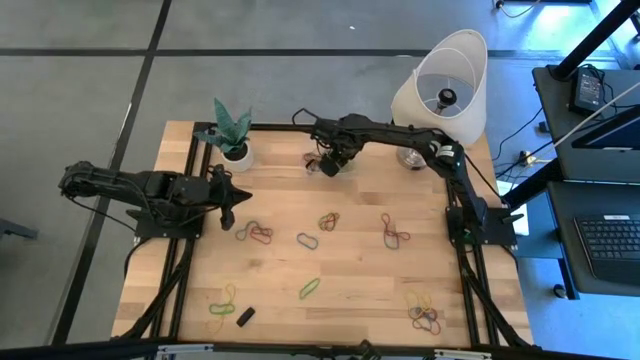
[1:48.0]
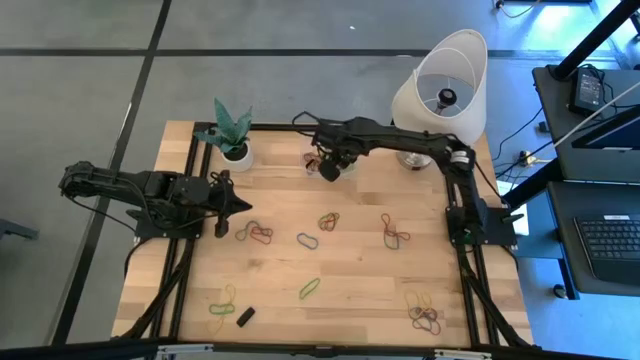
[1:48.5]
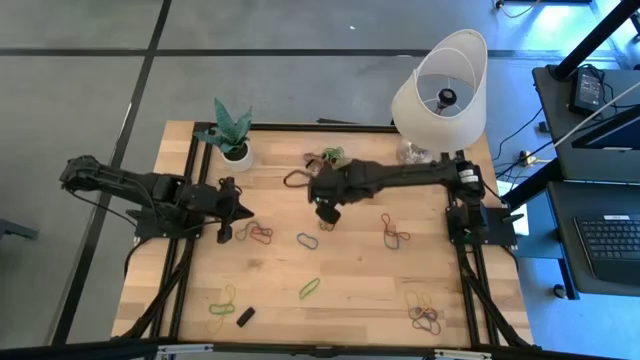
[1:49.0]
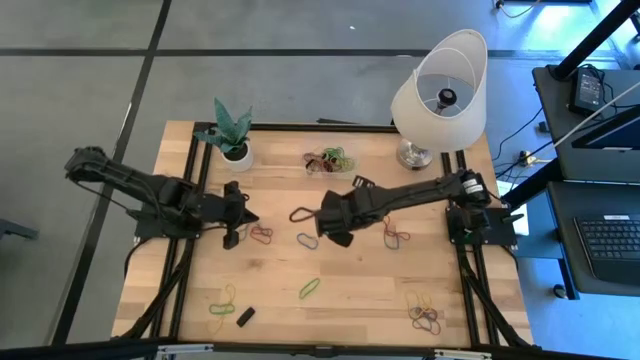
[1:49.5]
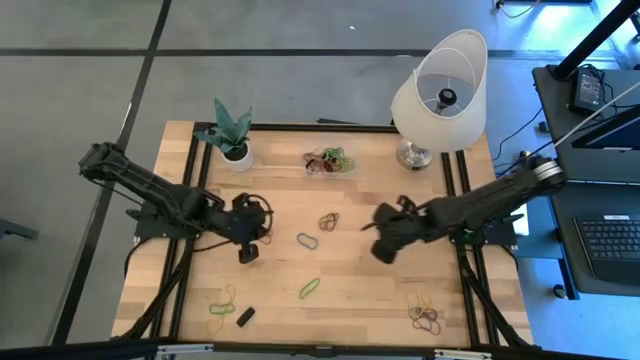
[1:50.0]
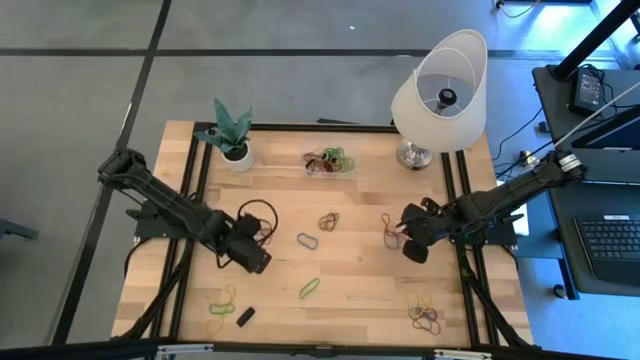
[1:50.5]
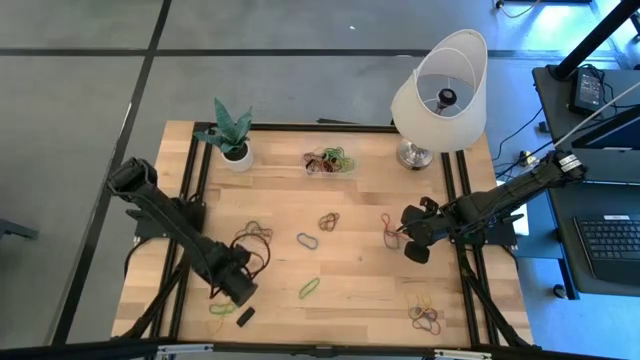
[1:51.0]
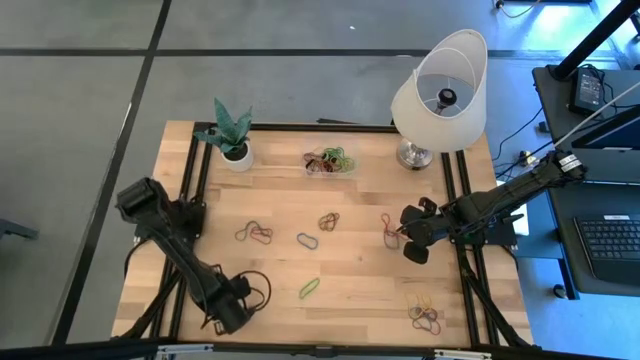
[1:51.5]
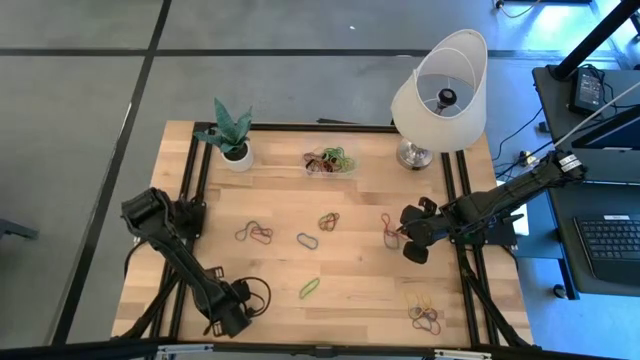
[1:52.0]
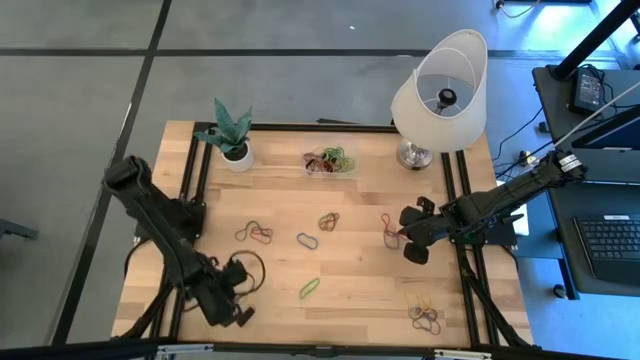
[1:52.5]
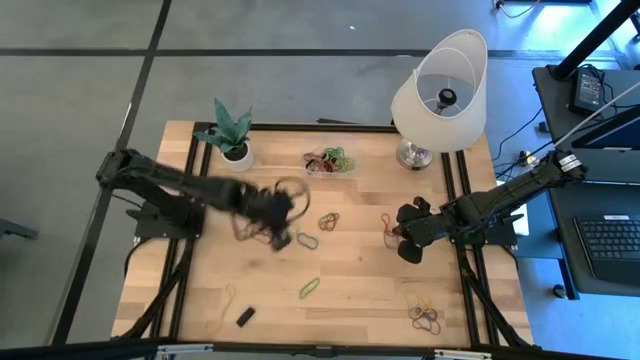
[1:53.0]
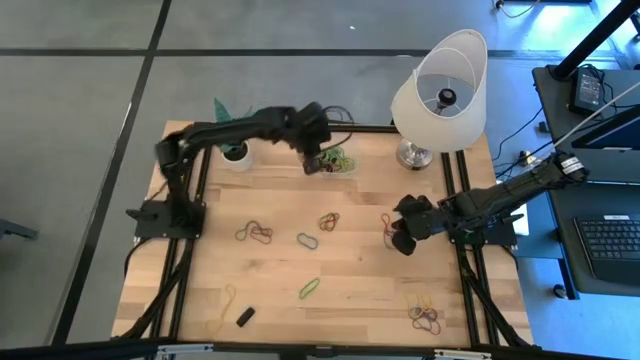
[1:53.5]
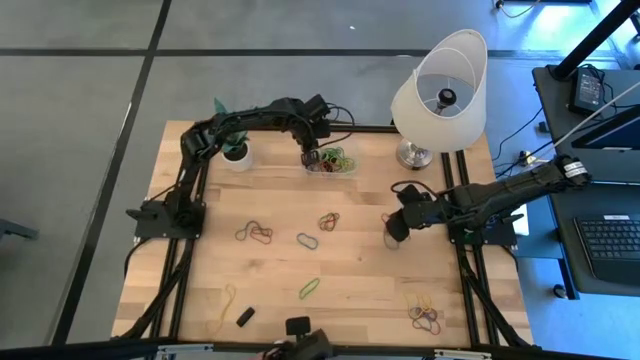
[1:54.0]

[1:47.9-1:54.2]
Task: Pick and place rubber bands into bin
Put the green rubber band into the transparent bin

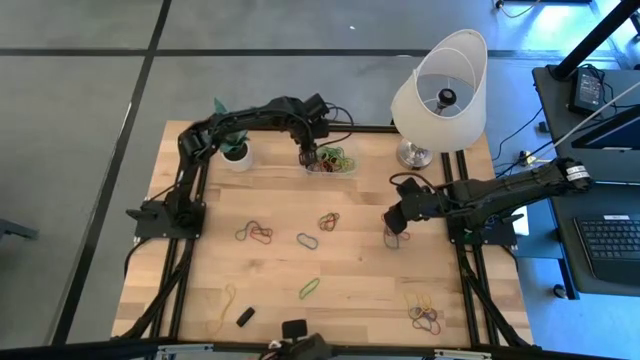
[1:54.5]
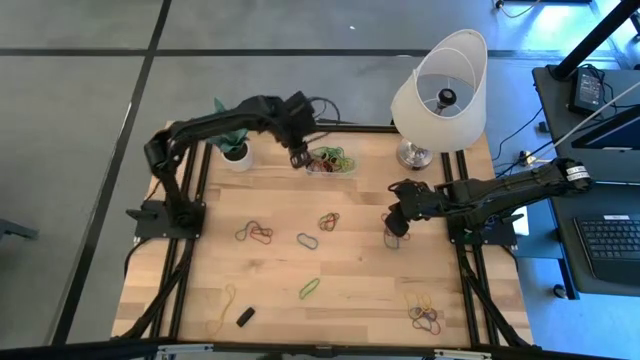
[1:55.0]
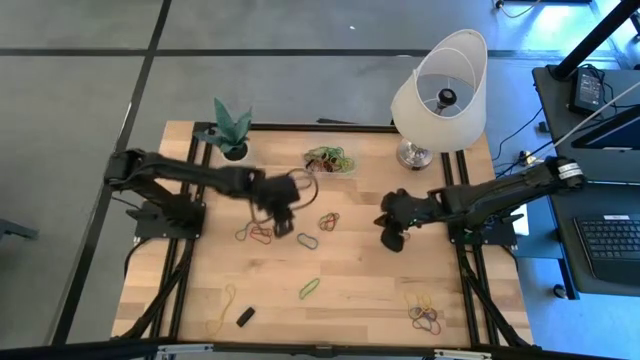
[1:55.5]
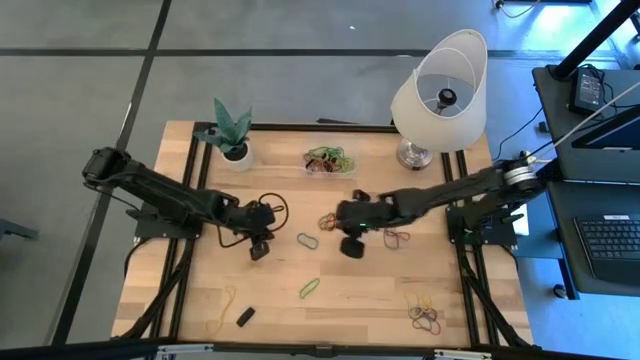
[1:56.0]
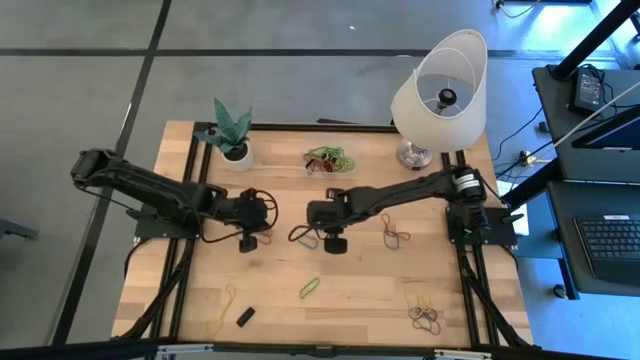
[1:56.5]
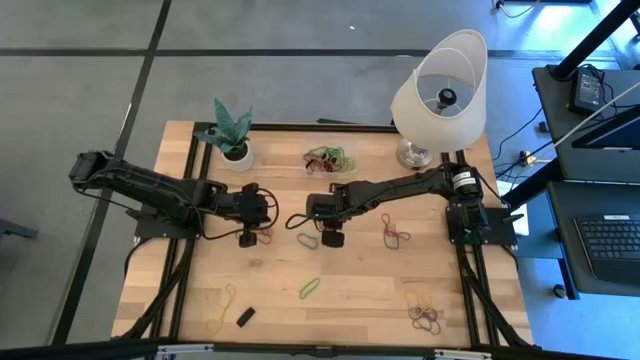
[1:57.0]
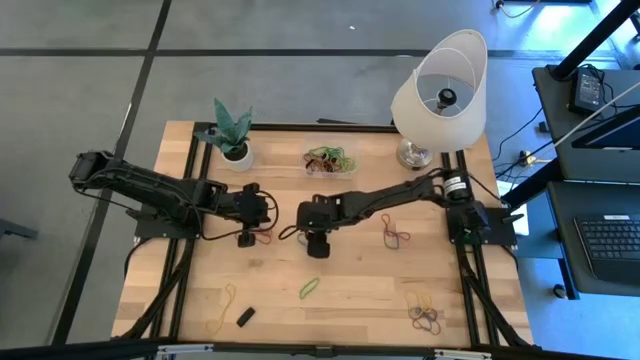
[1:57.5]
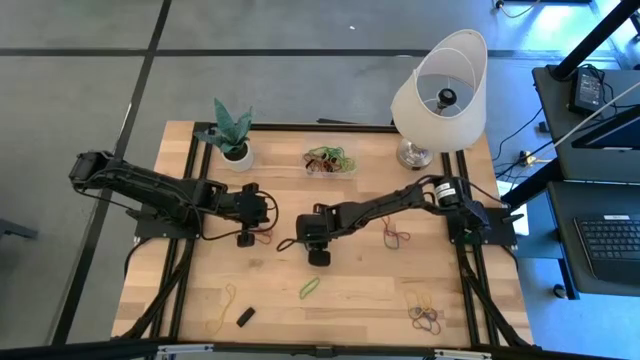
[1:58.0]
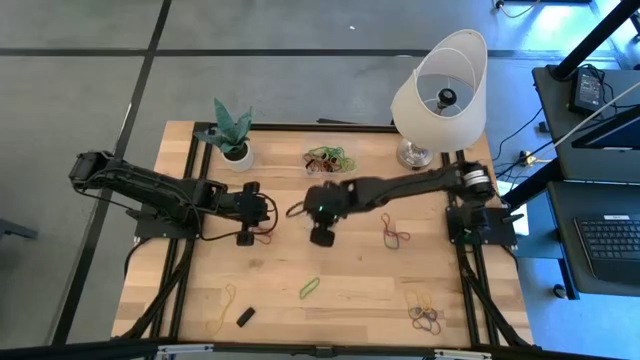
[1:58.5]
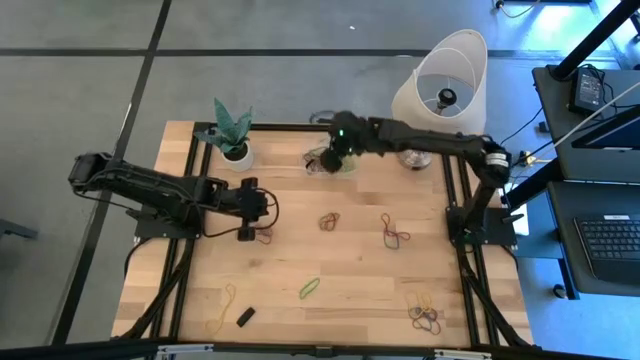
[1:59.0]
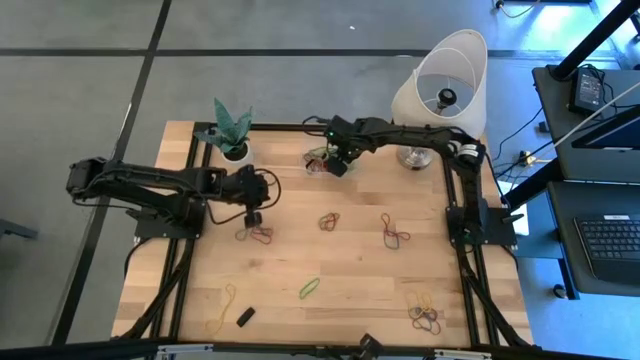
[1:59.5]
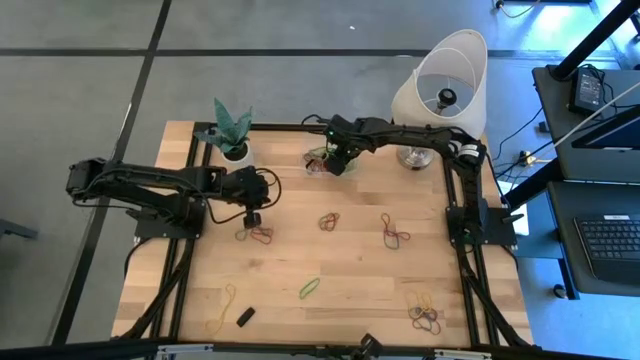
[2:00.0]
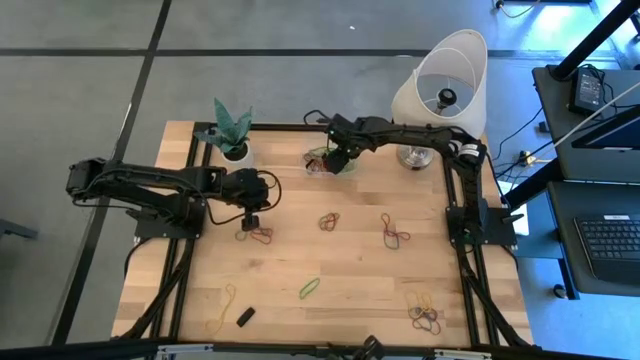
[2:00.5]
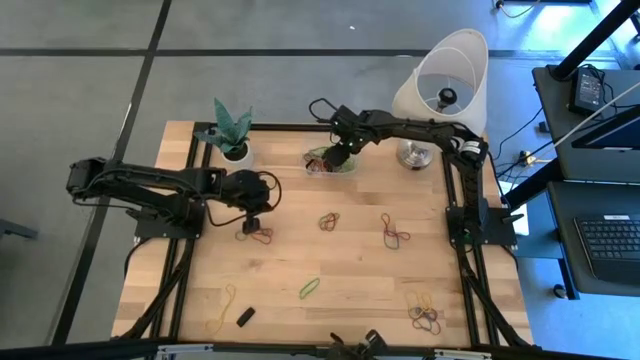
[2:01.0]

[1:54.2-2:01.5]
Put the blue rubber band into the transparent bin

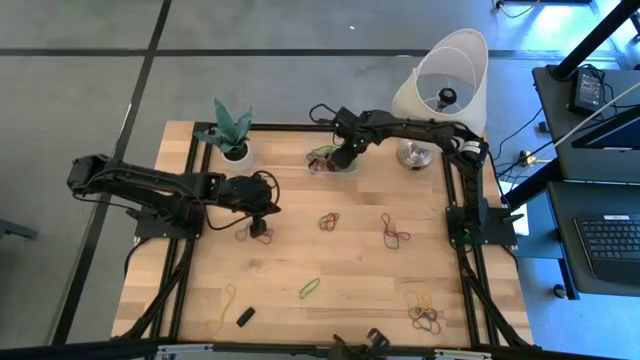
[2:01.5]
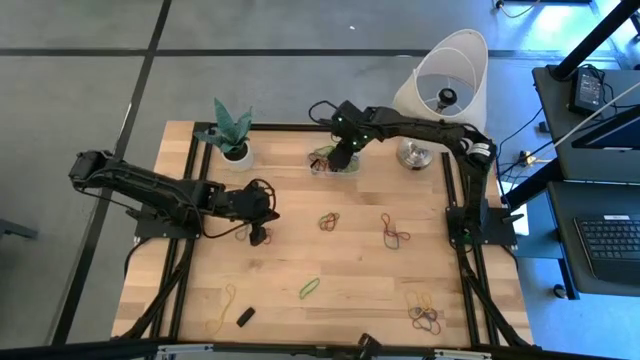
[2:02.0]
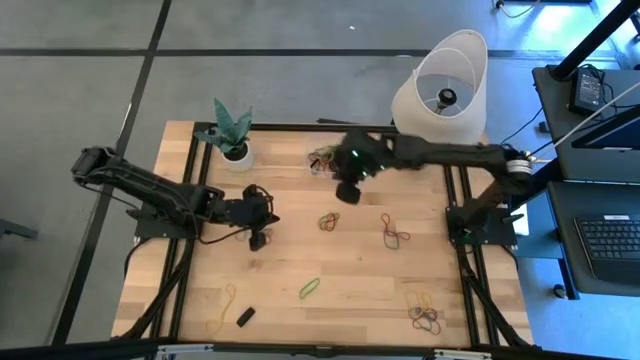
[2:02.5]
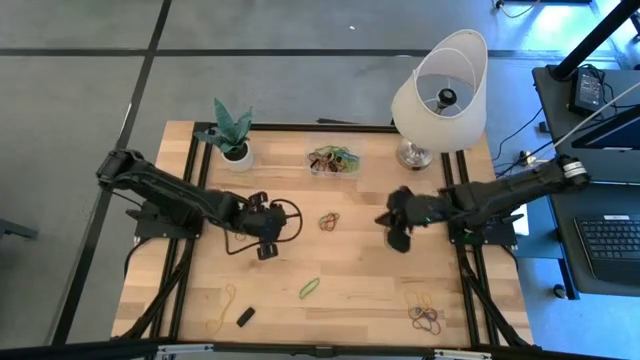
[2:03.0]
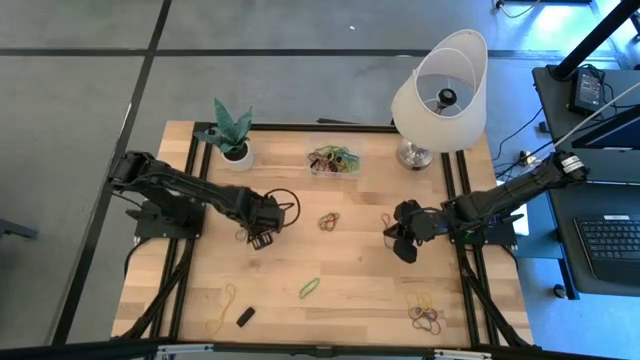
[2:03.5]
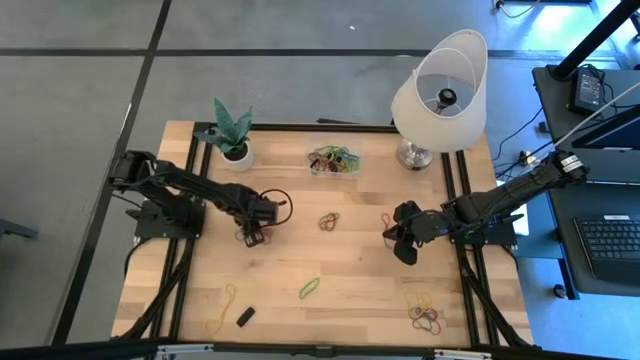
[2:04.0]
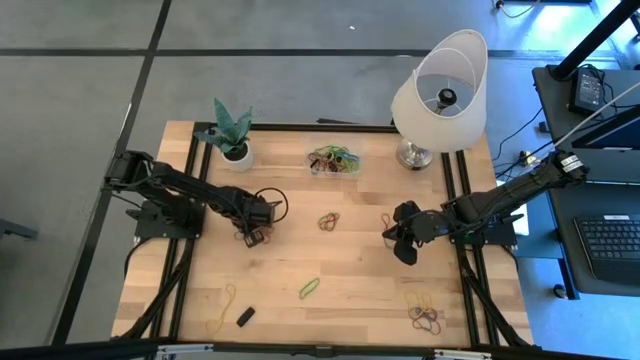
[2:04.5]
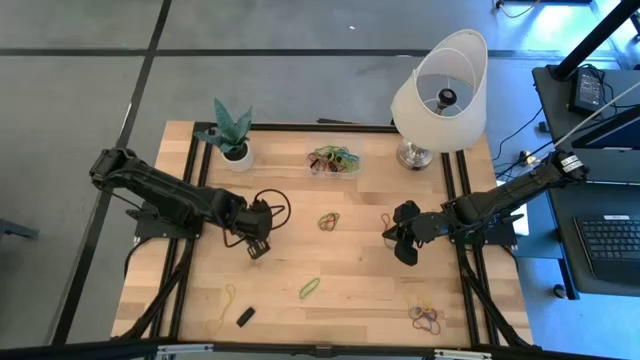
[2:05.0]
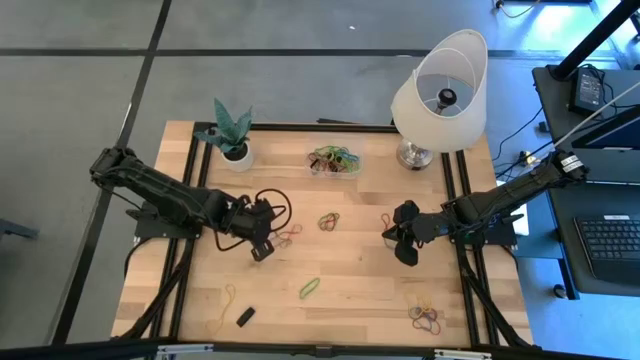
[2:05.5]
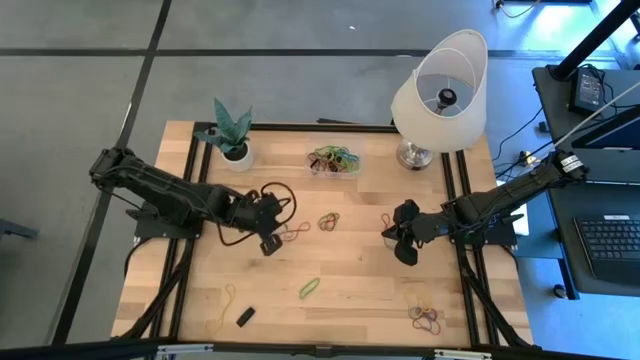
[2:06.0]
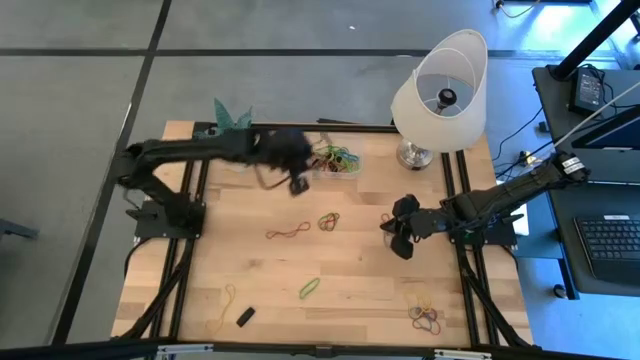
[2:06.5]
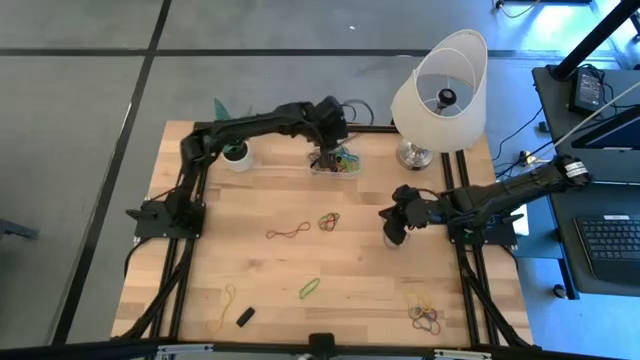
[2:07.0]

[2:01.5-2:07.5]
Put the blue rubber band into the transparent bin

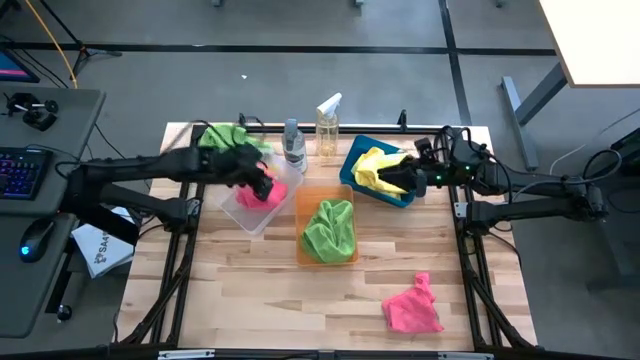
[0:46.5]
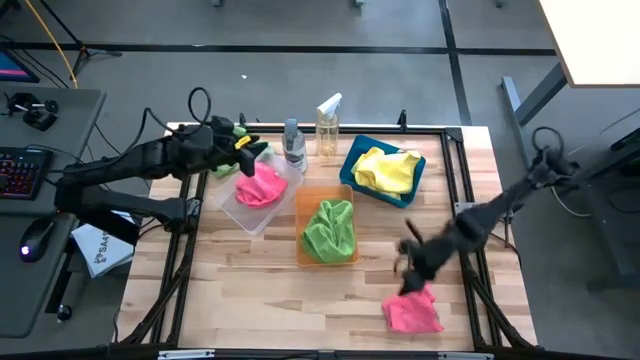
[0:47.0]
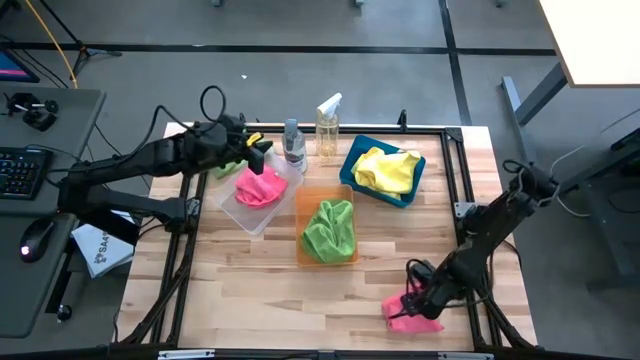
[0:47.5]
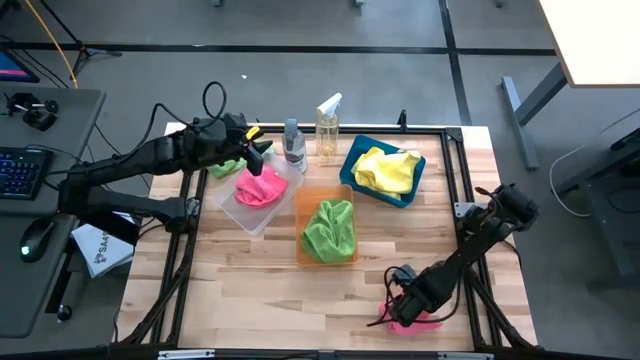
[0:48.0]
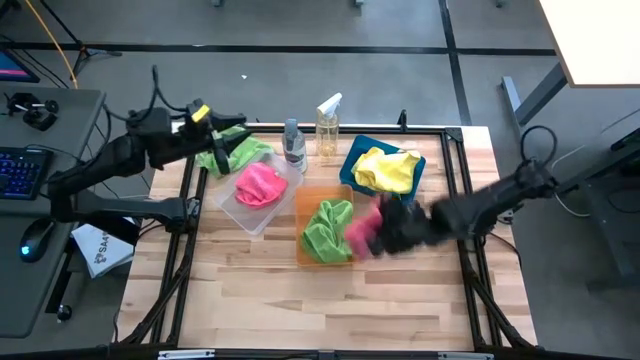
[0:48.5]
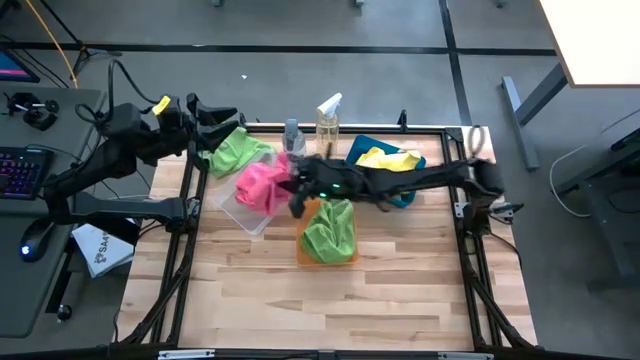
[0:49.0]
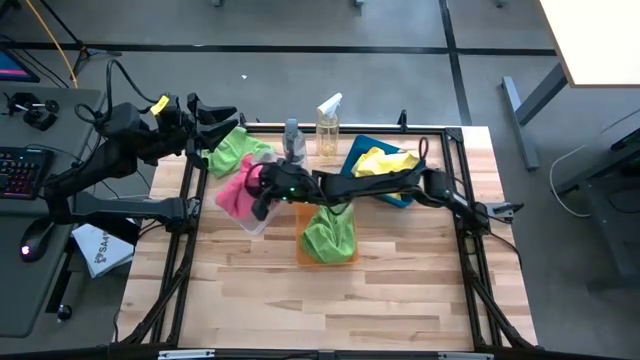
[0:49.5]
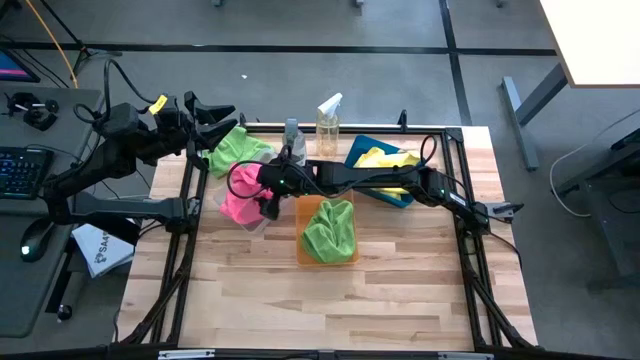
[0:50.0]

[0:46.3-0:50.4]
Task: Sort microfiber towel by color & place in baskets
Put the pink microfiber towel into the transparent bin
